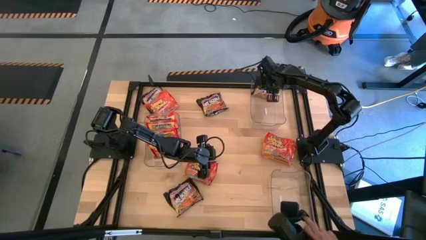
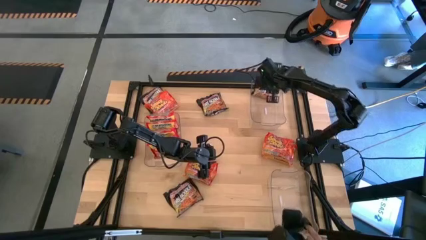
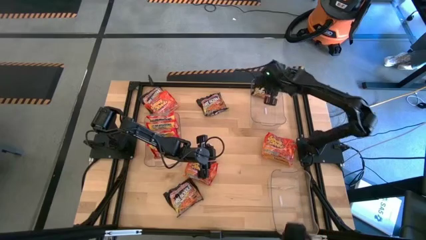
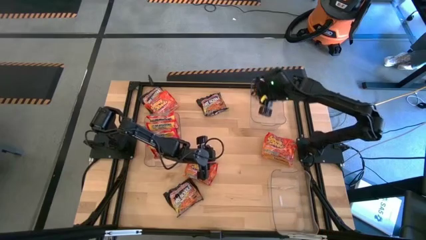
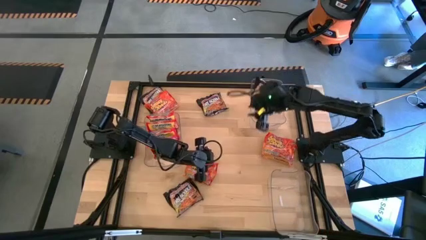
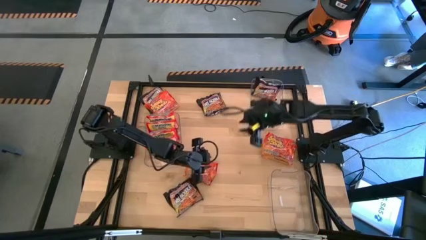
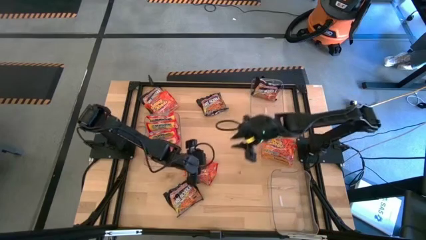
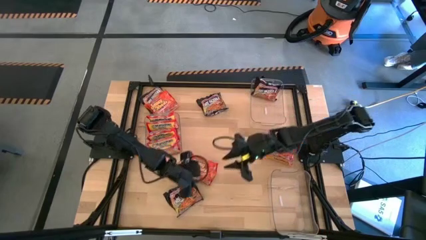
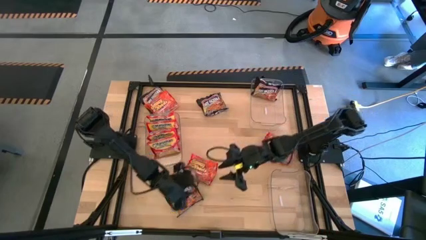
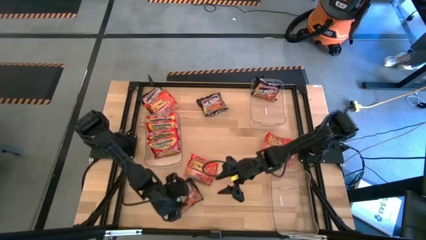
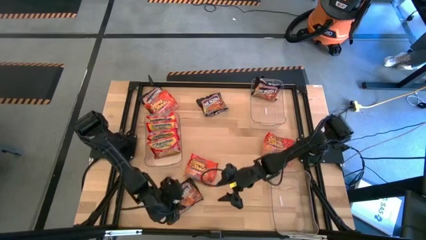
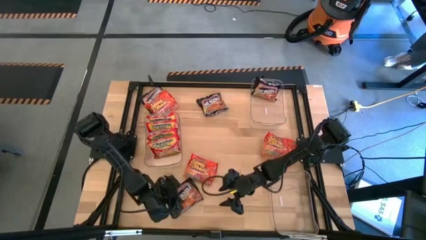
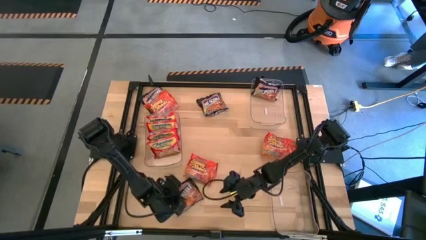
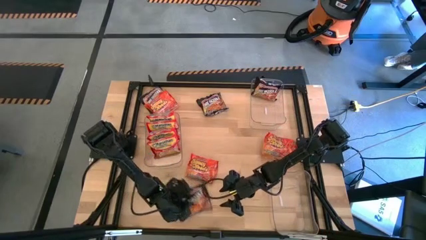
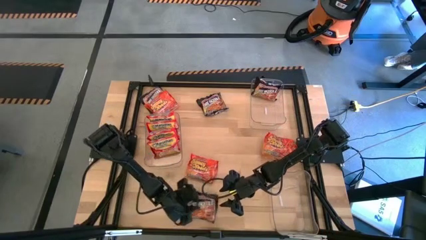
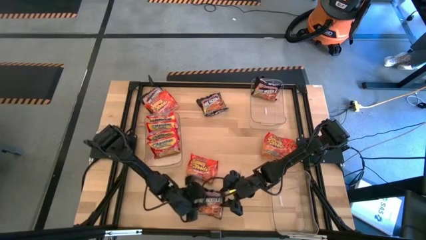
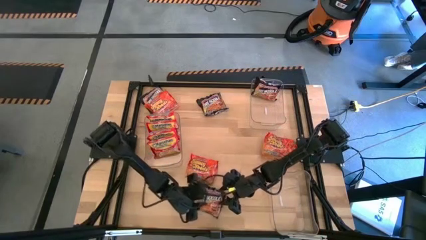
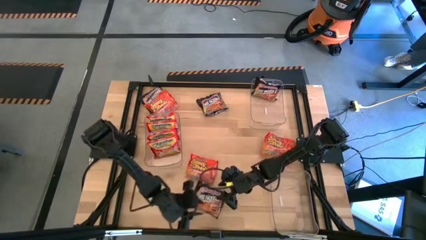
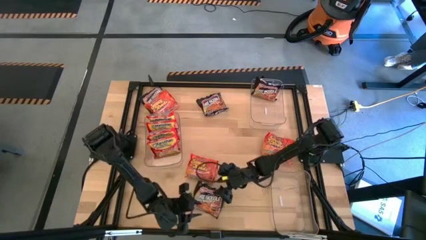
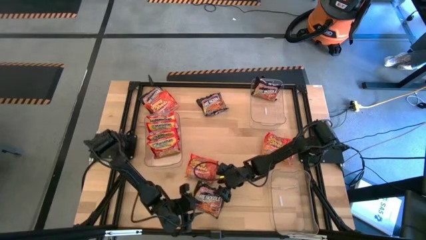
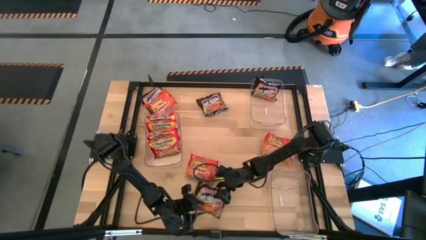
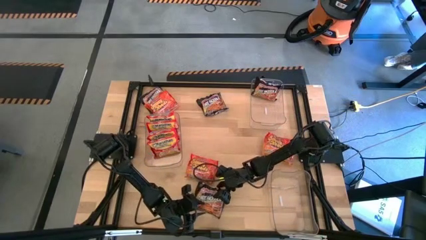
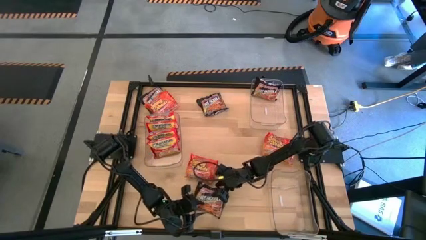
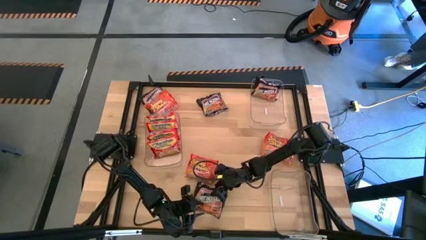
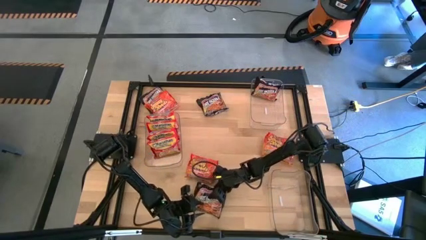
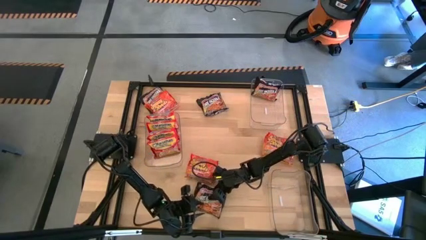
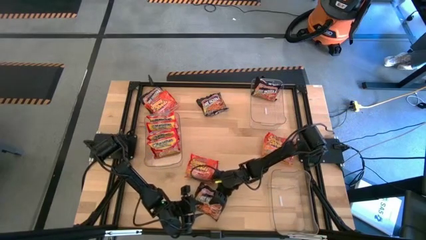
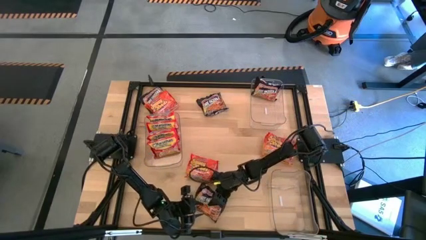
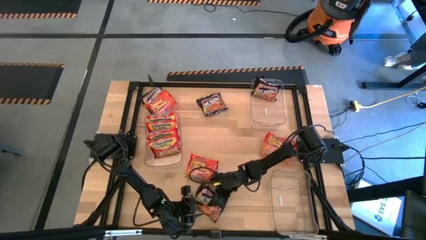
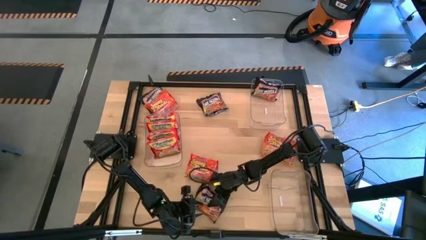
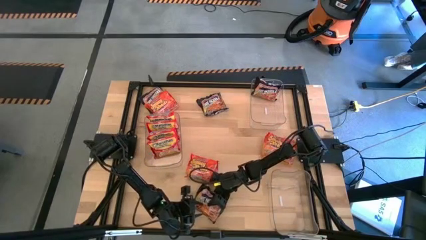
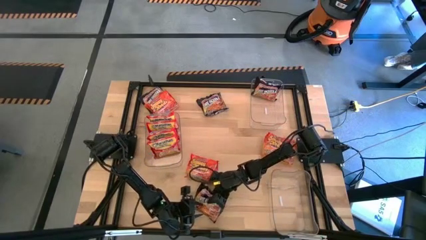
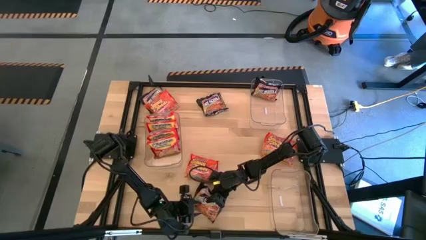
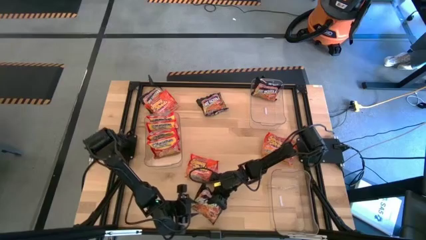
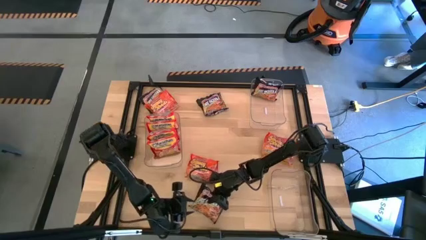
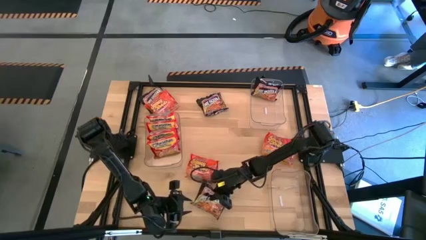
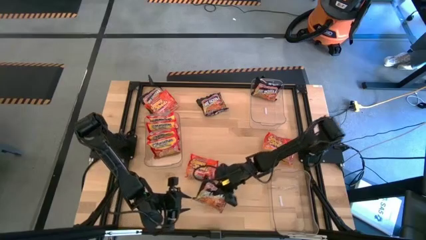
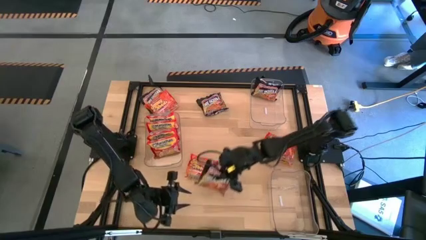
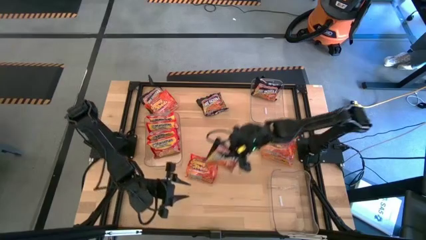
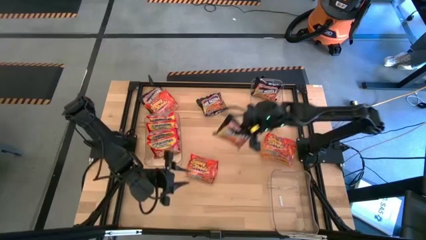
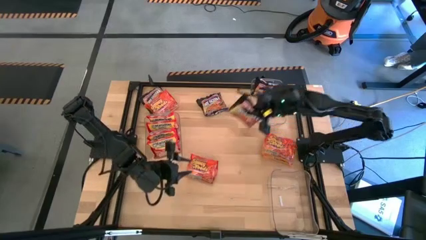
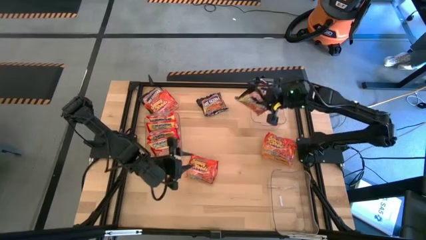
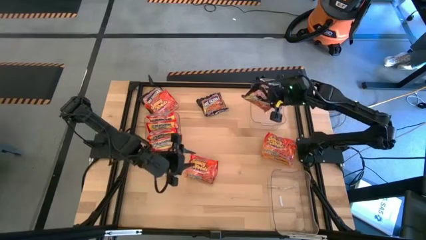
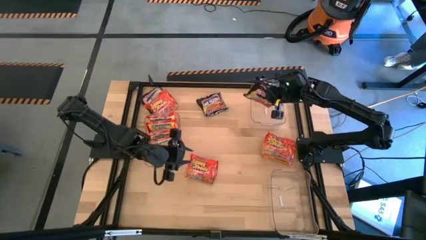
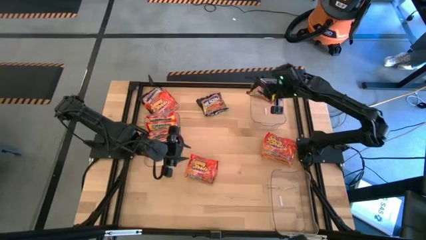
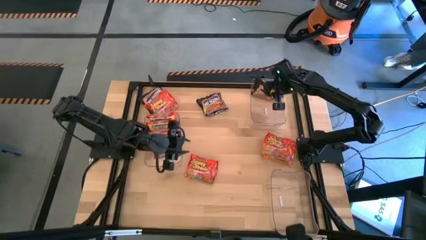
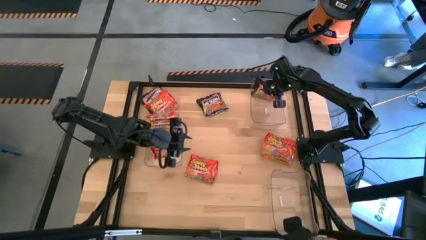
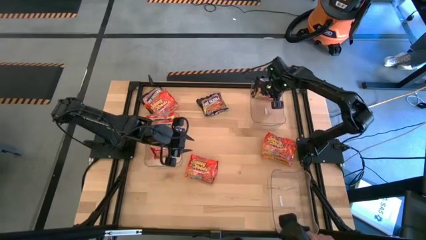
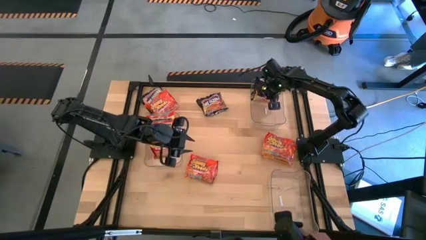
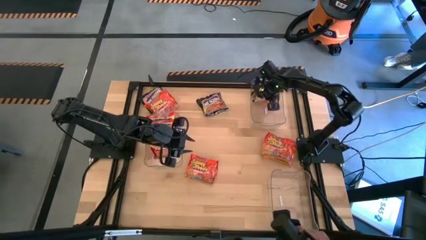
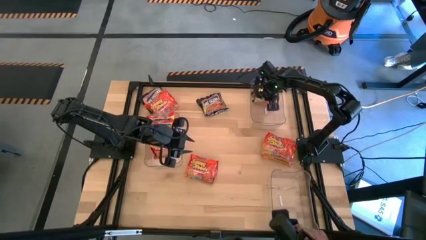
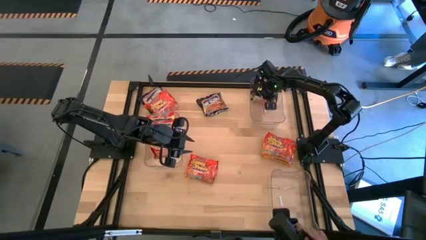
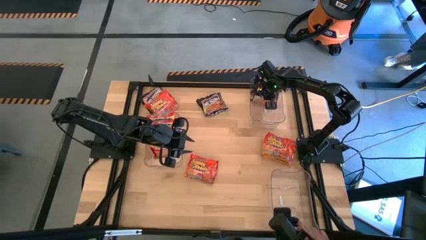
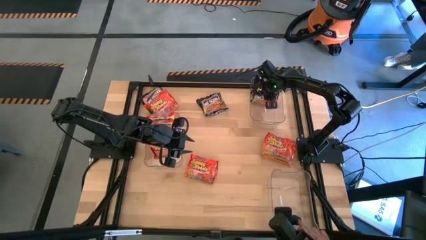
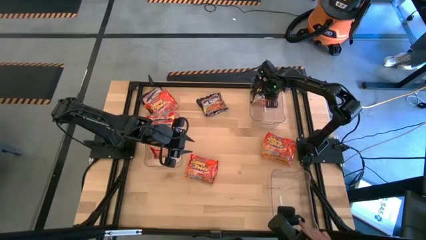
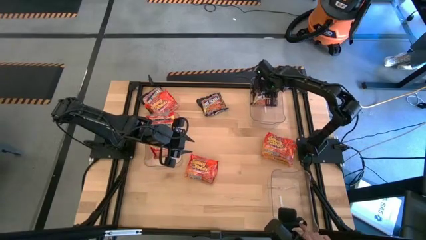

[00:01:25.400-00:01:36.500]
Task: Sort Maruchan noodles
Put the black noodle pack into the top transparent bin

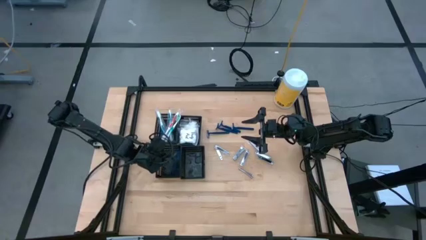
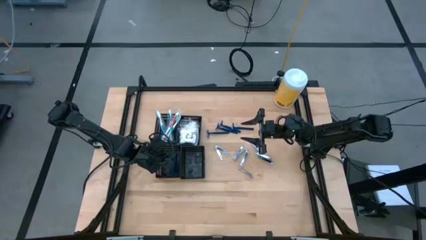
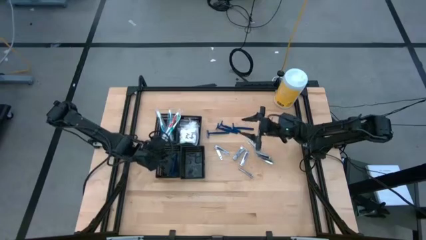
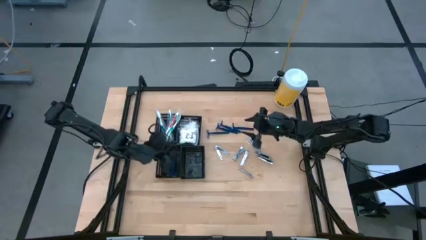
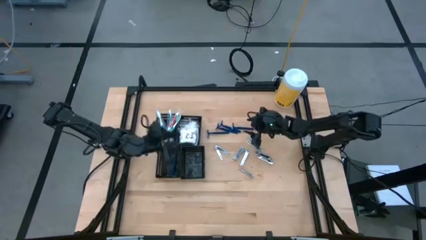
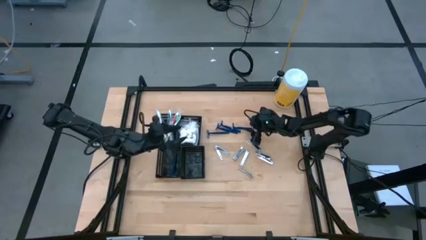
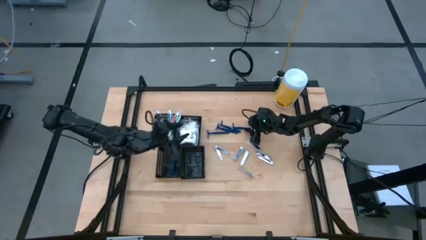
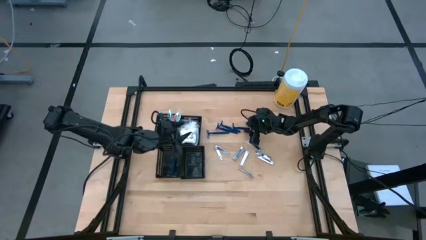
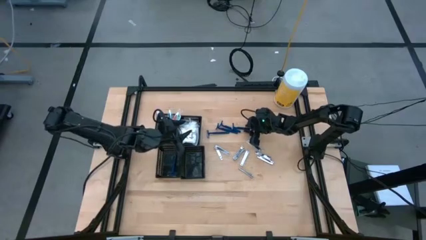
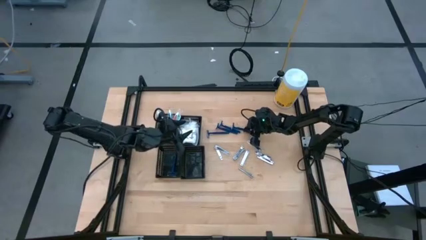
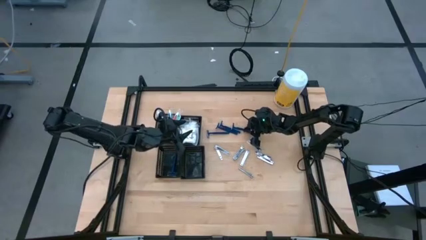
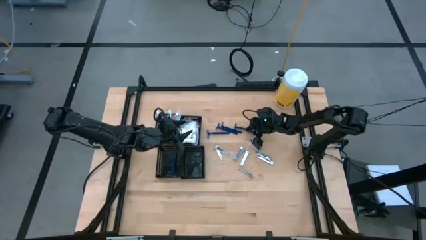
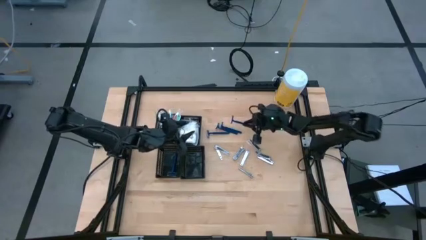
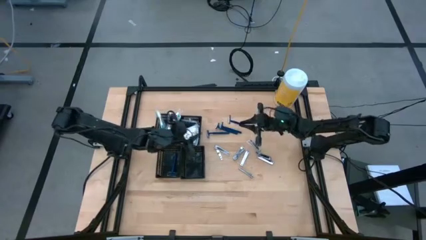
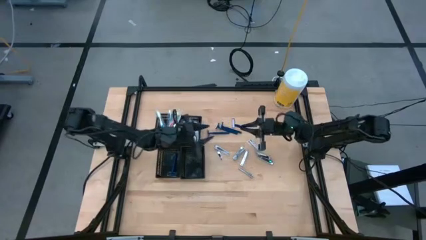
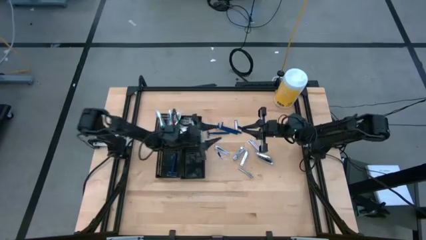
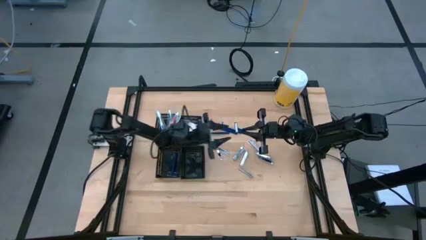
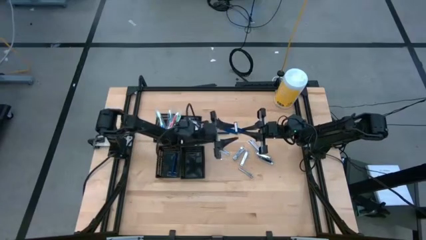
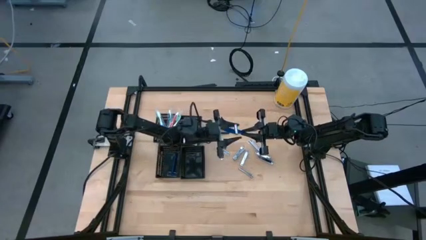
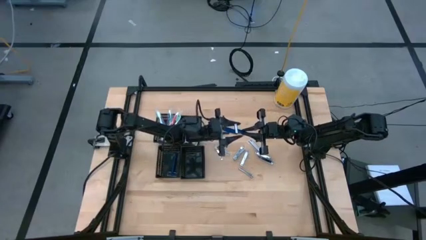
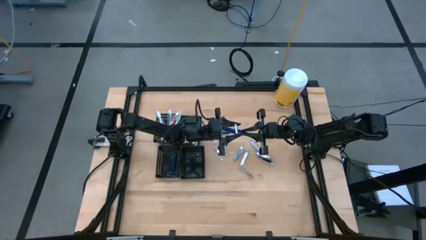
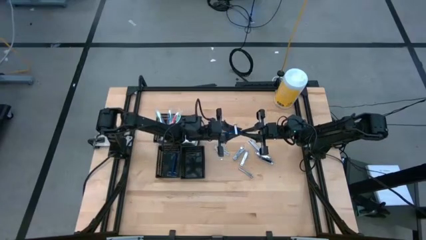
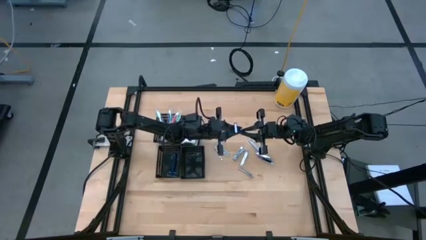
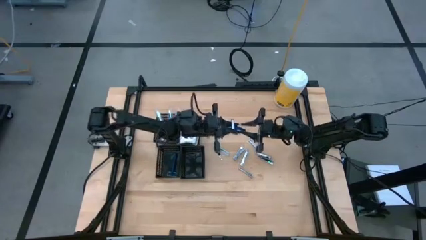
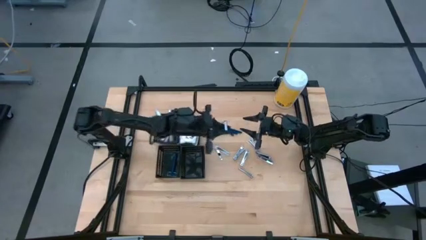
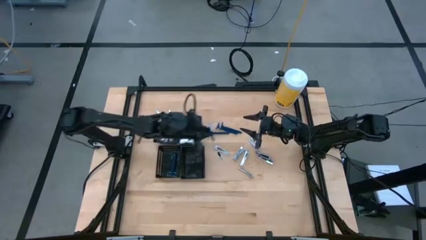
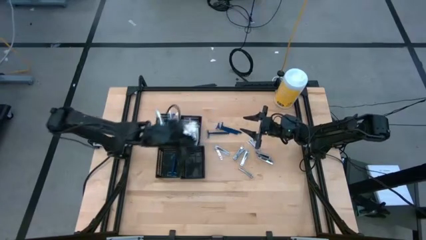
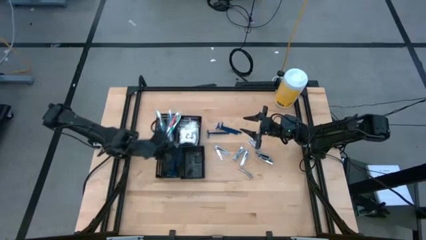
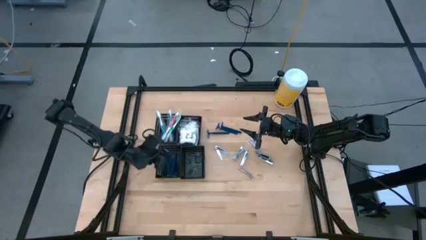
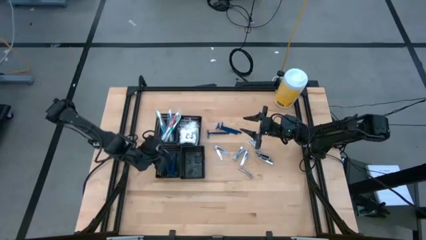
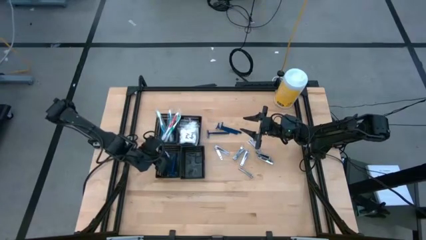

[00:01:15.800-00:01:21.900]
Task: Pick & Place Travel size toiletries
Put the blue razor into the bottom left black bin
